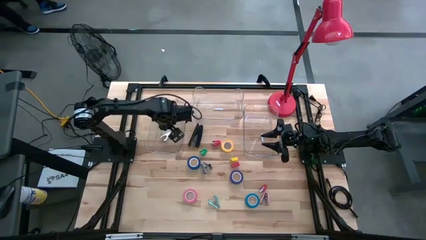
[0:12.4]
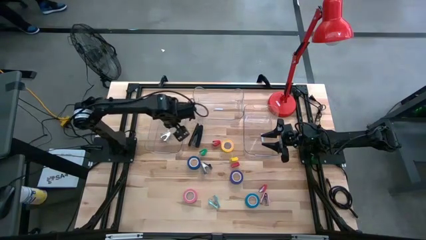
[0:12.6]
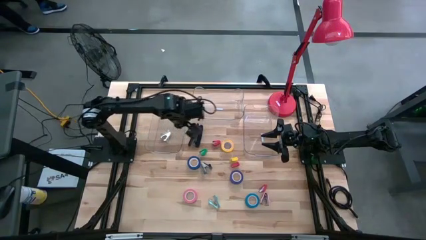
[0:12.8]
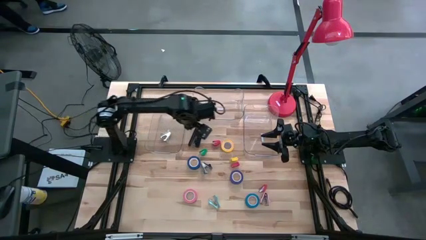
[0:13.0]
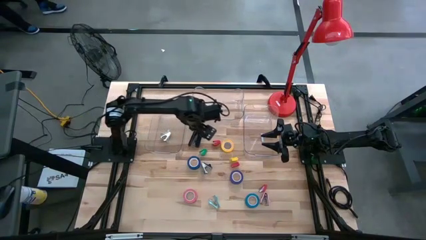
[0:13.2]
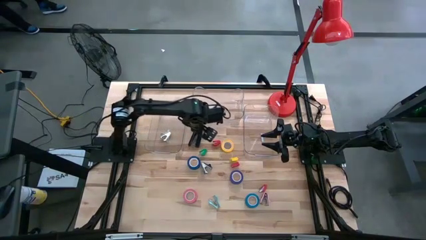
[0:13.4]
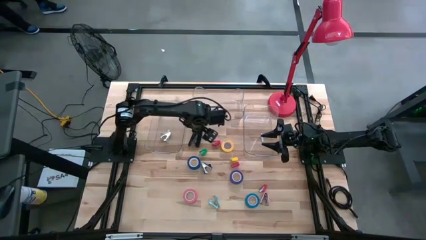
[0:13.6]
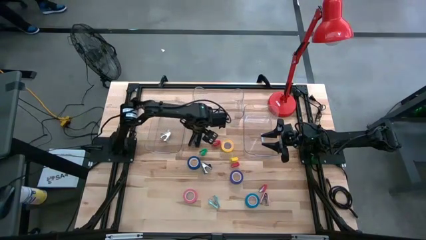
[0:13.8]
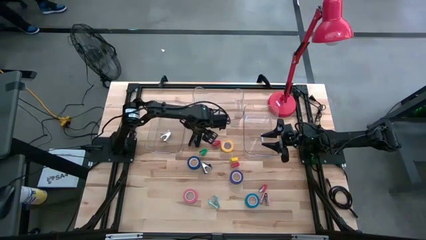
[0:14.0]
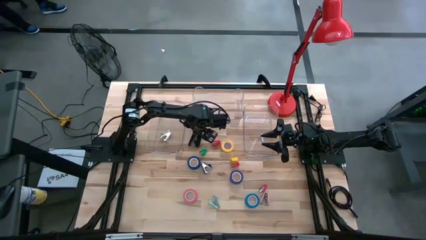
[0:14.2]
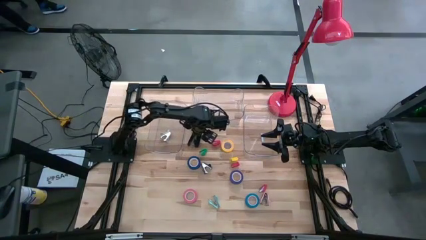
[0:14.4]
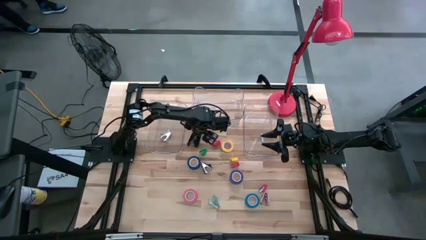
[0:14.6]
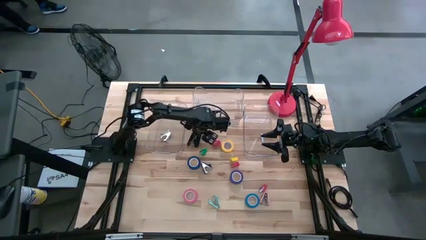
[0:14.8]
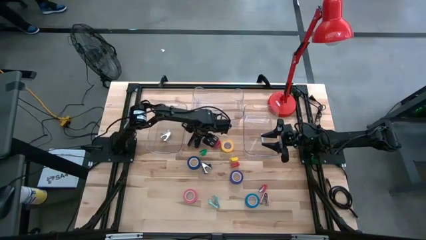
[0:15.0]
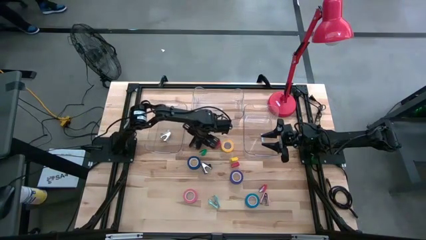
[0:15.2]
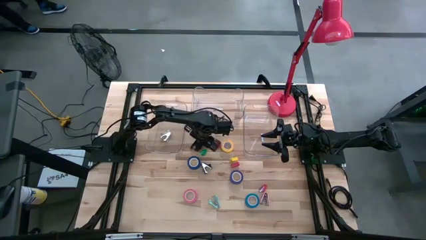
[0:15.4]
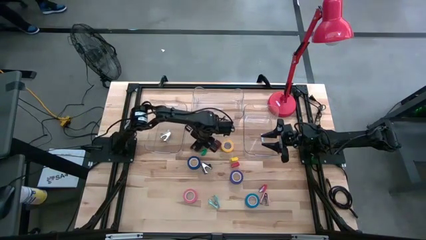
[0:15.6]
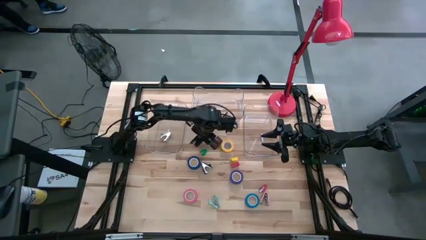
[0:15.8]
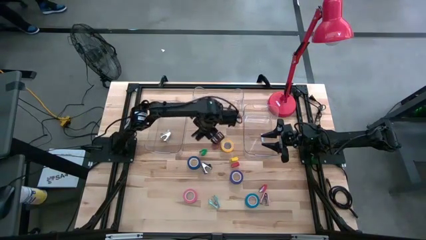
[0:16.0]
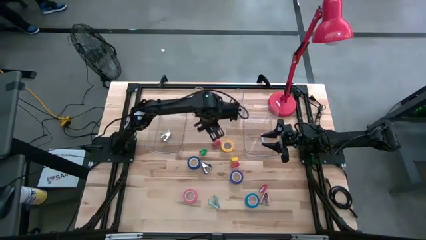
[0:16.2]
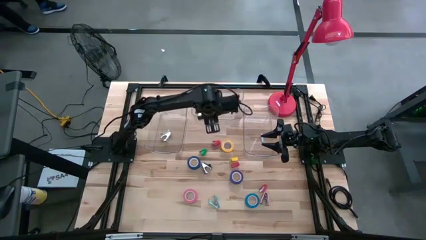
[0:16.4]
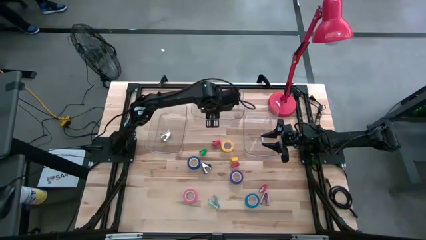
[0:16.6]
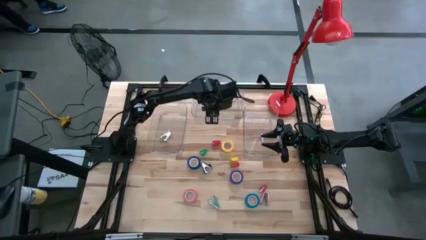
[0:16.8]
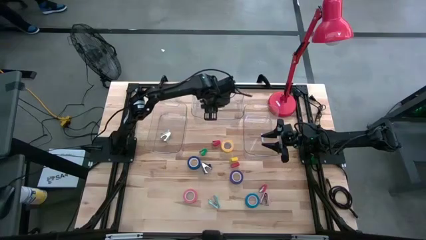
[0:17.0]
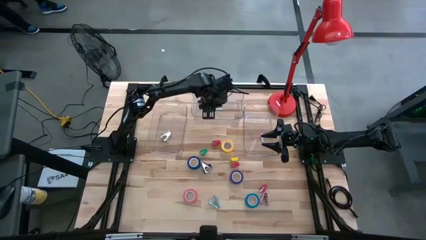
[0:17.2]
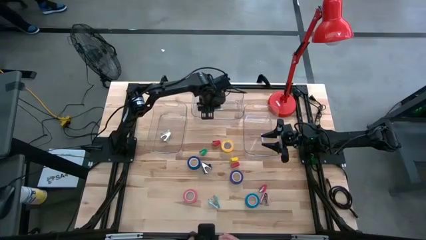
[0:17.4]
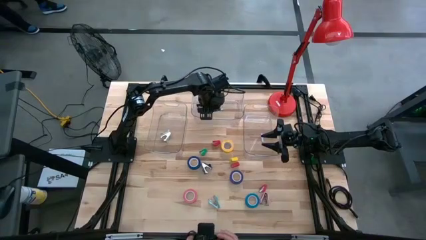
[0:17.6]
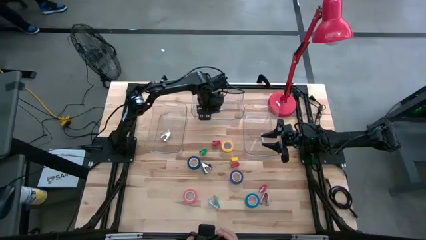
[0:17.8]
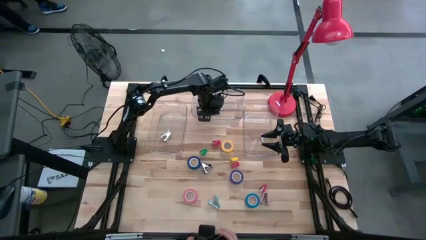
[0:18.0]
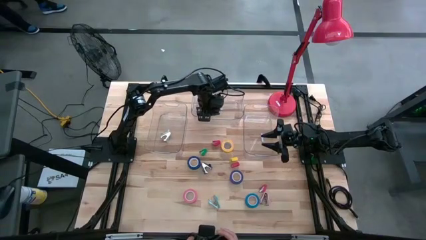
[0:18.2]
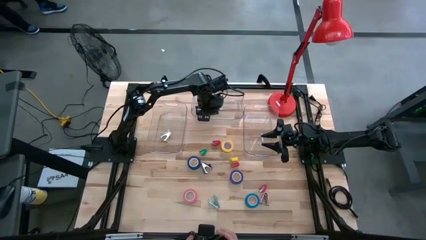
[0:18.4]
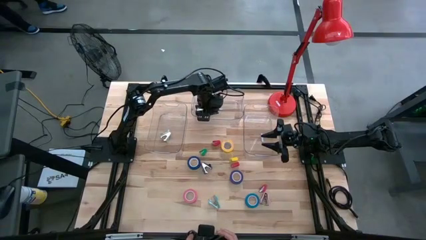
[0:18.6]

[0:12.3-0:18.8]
Task: Pick and place Stapler, Stapler remover, tape
Put the black stapler into the top transparent bin

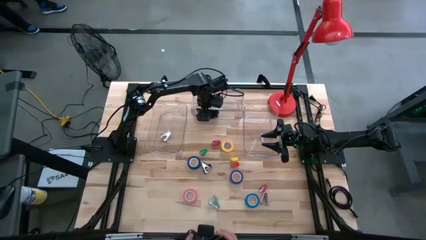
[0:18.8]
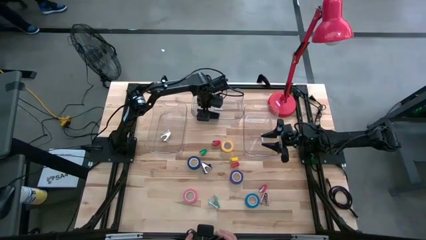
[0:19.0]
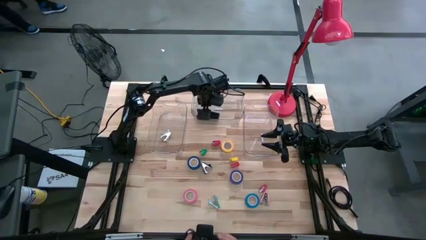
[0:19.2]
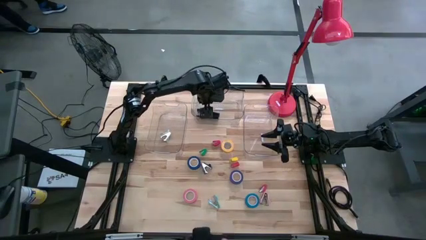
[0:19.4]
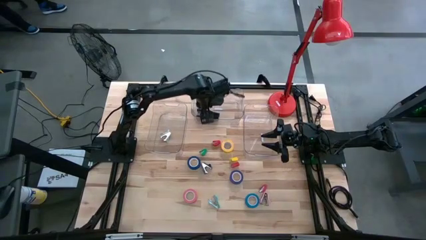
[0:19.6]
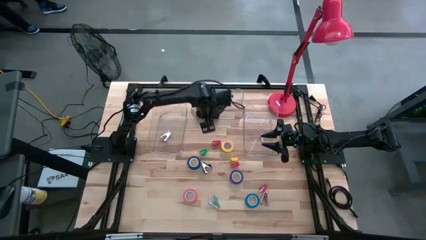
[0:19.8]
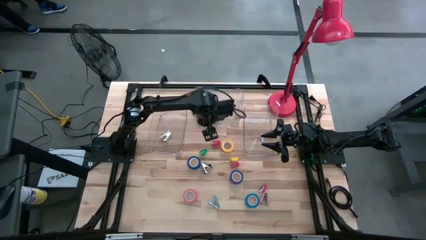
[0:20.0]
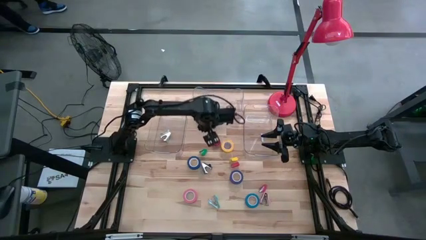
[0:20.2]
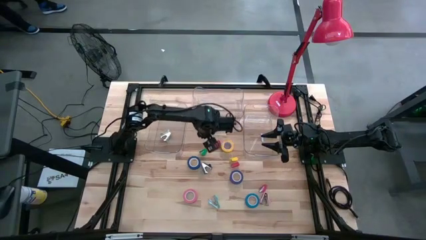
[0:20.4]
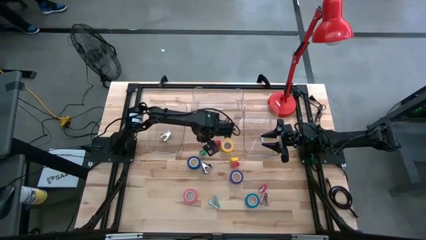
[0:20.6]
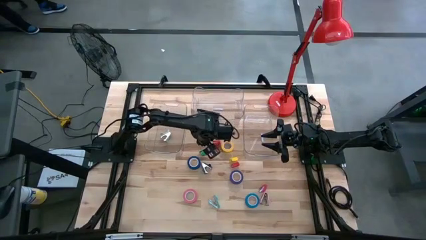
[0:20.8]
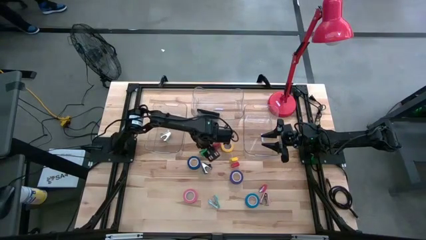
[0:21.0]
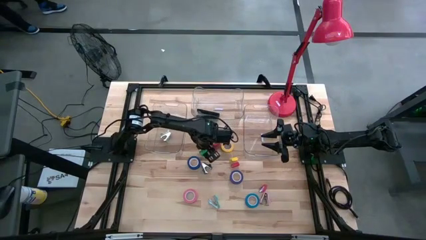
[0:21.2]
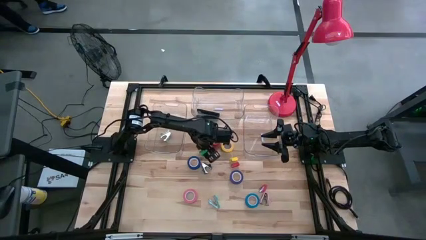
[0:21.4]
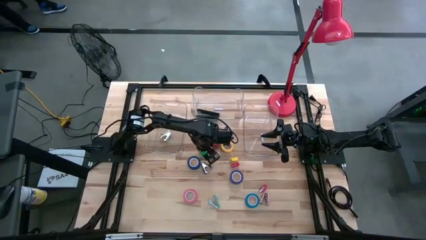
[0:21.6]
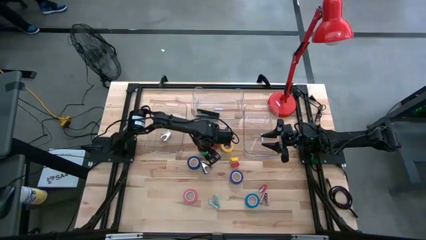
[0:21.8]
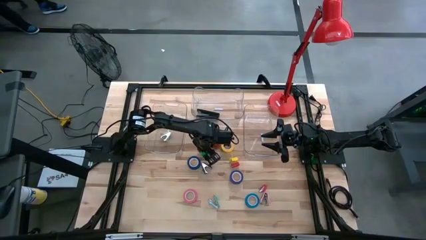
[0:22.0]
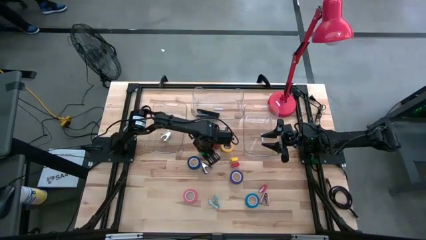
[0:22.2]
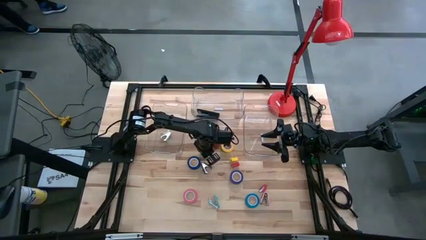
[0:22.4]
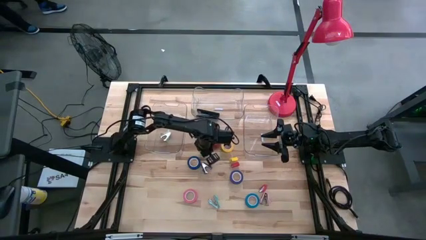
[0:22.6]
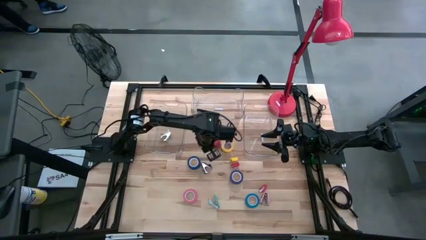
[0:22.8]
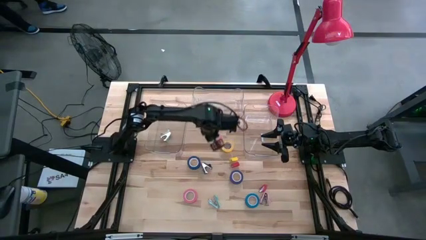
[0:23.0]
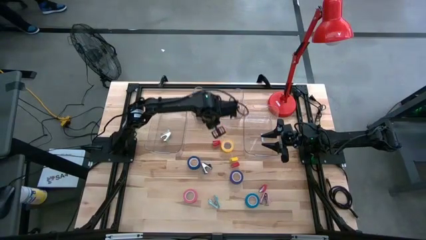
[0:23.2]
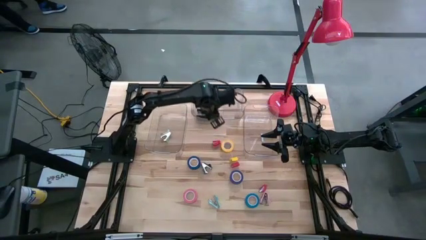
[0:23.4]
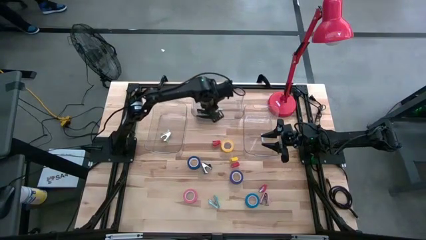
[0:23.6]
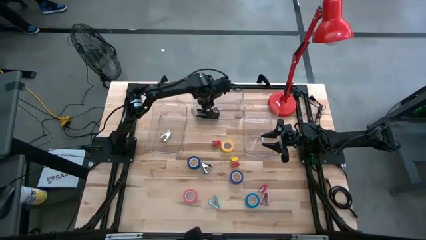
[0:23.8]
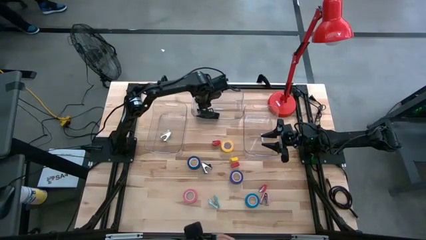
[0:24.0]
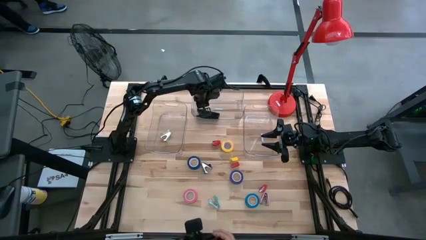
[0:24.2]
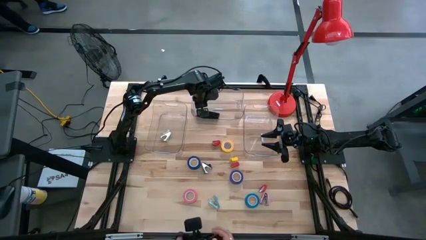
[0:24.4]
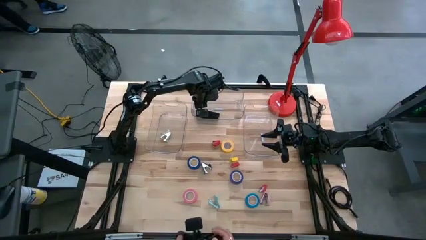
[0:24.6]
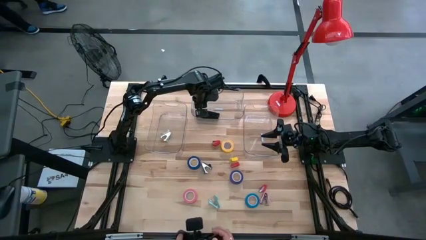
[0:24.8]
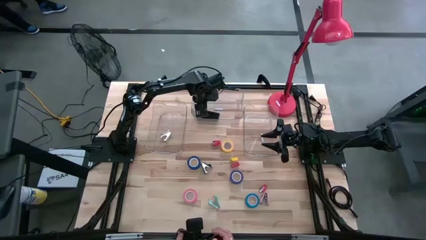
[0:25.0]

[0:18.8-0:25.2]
Put the green stapler into the top transparent bin

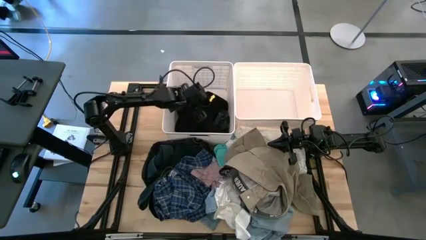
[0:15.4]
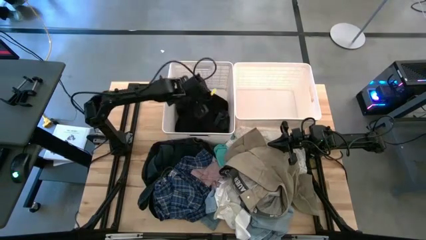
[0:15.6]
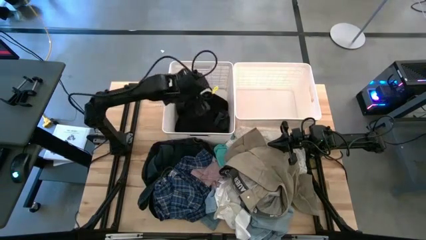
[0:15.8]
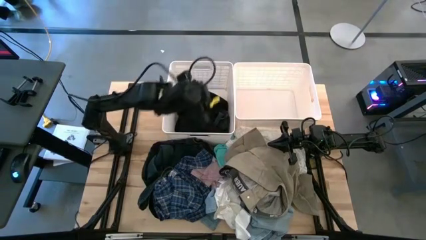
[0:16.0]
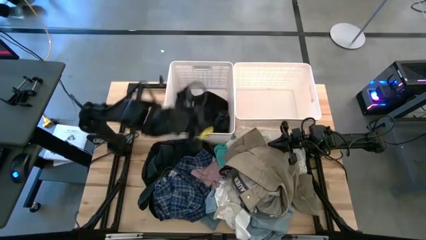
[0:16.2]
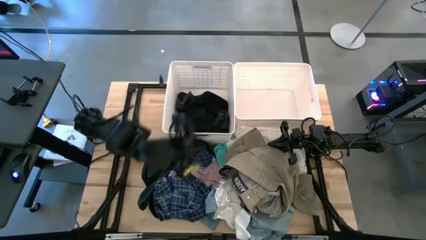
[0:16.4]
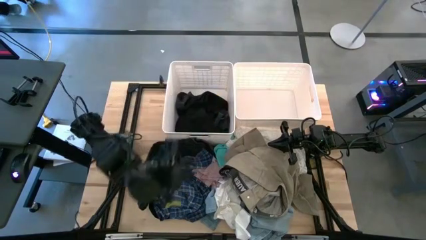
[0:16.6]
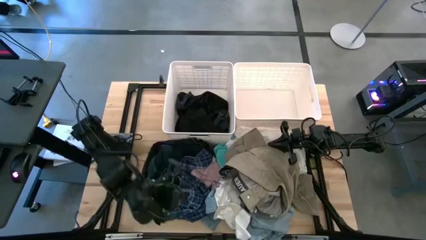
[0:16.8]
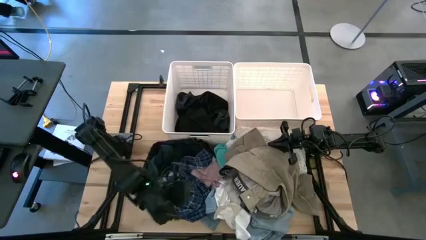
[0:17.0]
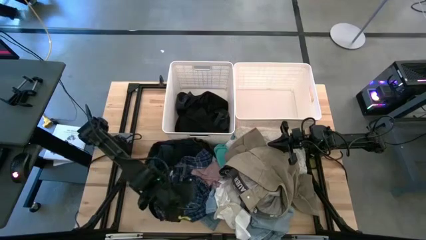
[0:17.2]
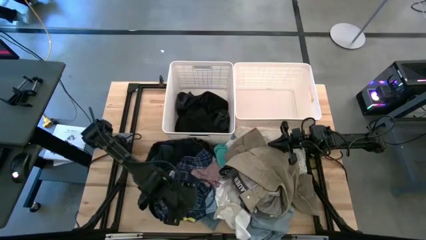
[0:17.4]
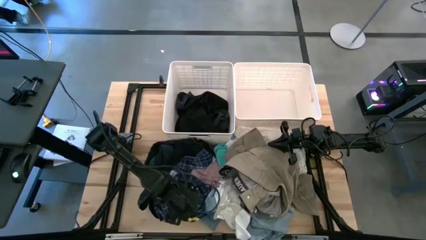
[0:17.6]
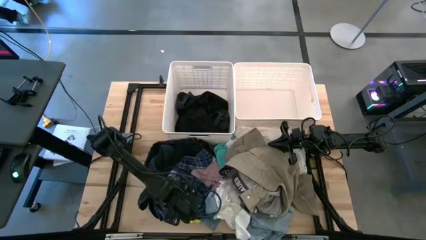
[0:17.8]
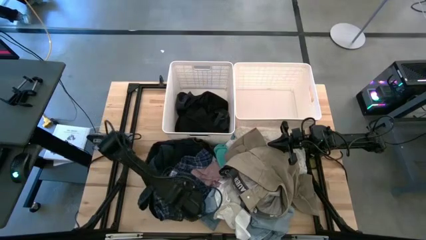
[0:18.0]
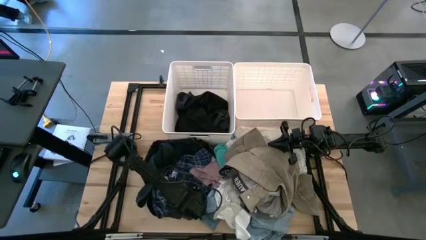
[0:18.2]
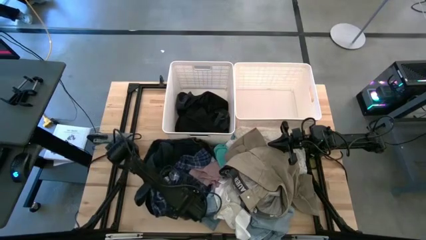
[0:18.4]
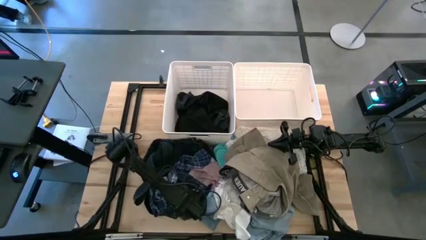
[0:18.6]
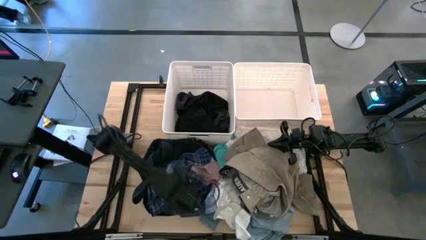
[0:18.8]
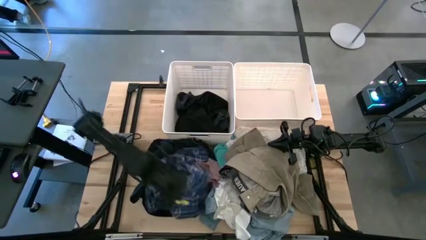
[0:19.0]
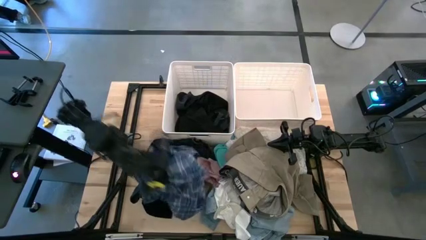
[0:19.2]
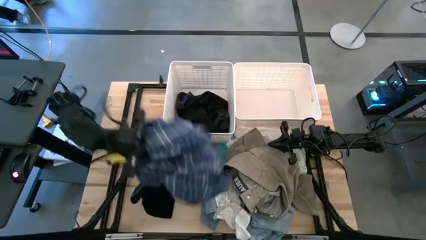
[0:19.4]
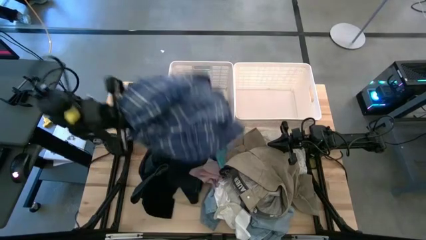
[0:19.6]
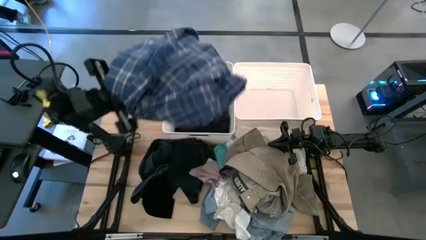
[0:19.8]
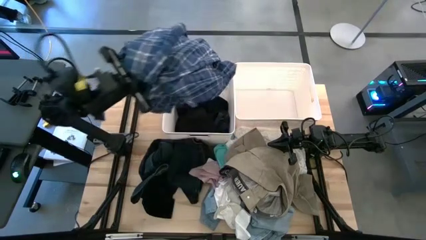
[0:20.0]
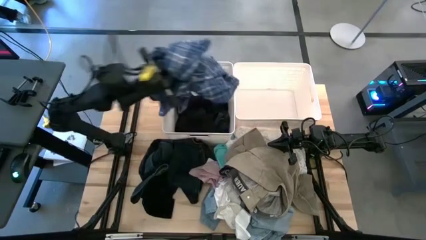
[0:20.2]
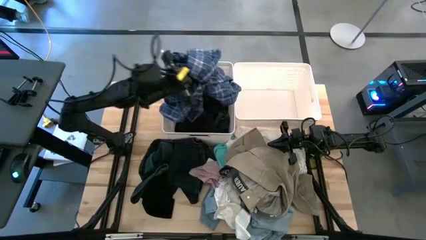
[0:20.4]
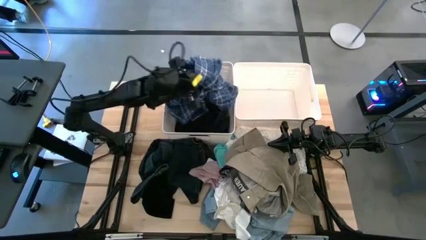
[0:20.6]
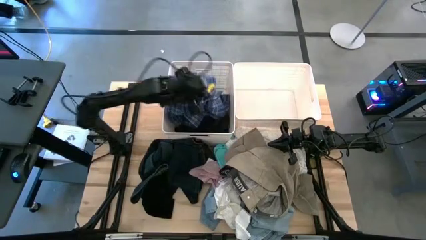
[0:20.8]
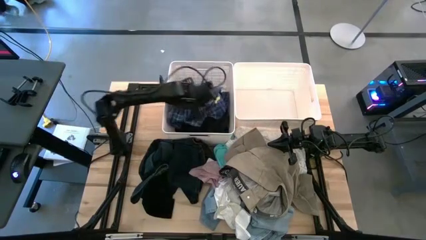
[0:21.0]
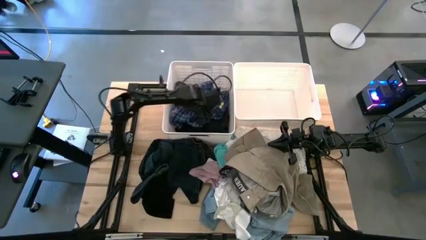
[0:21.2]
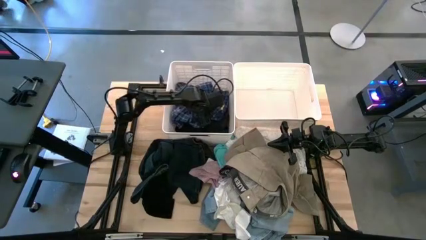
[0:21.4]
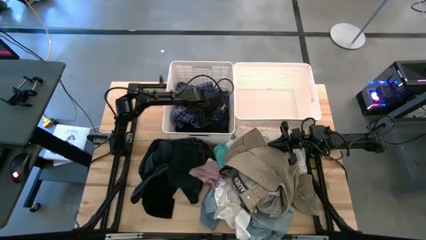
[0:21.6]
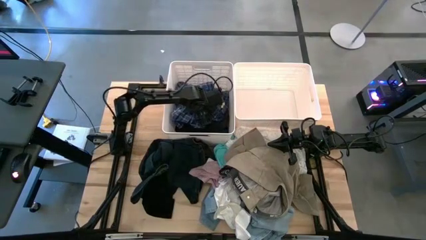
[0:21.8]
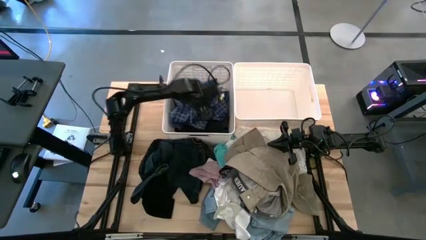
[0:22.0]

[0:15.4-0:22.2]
Task: Sort clothes
Put the blue checkered shirts into the left white bin
